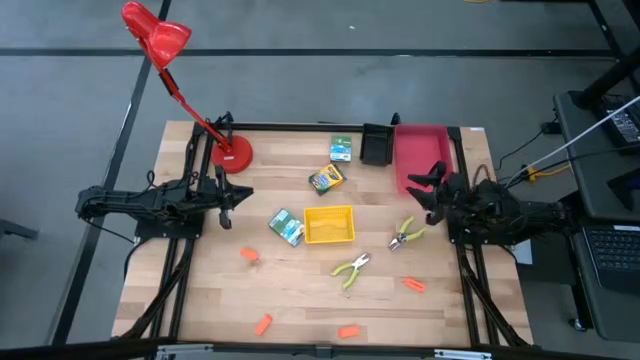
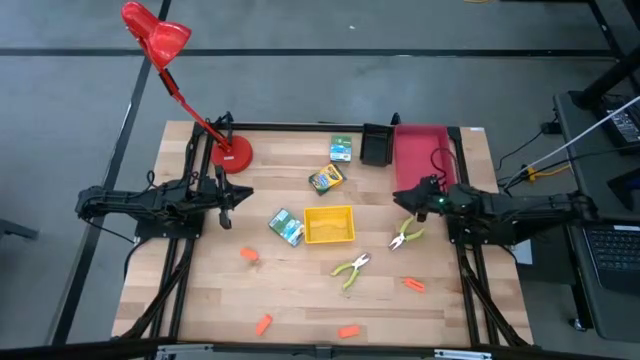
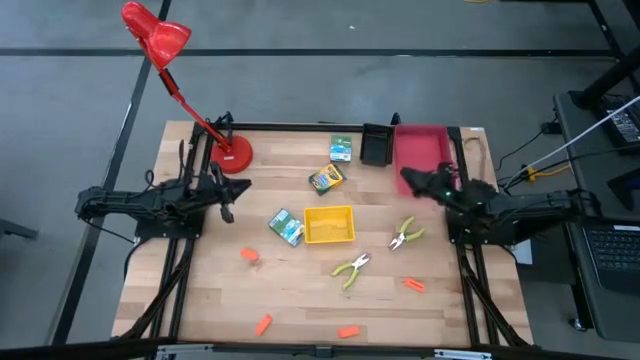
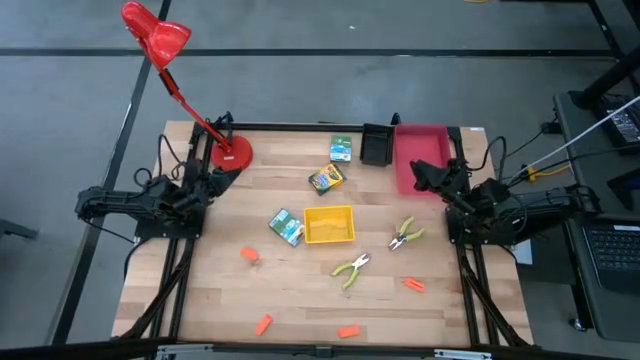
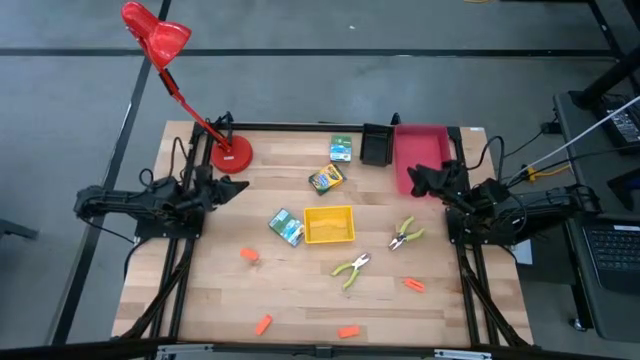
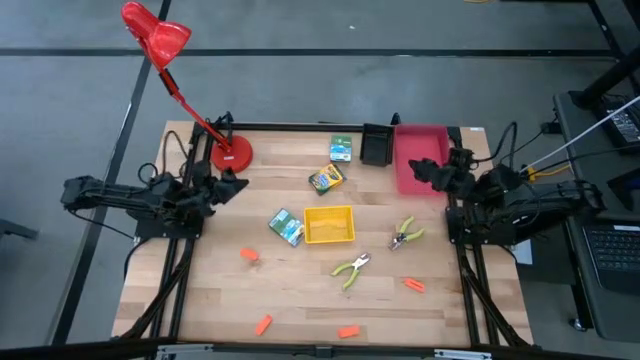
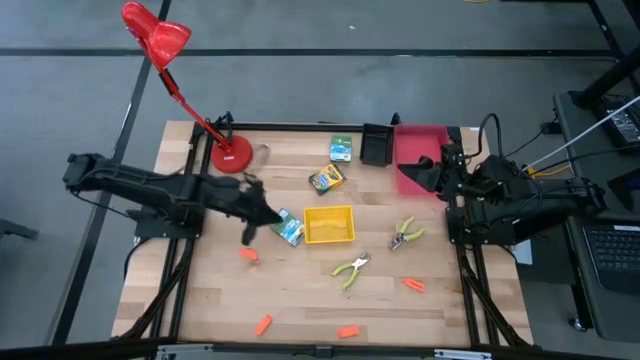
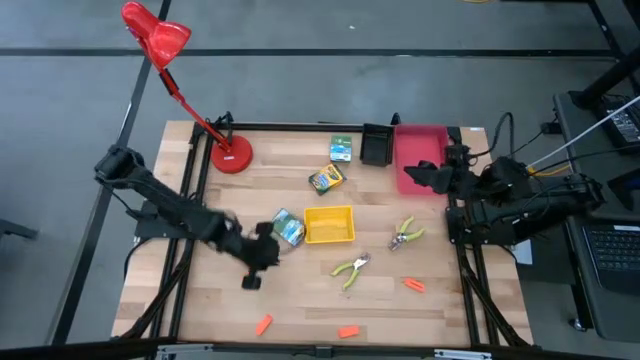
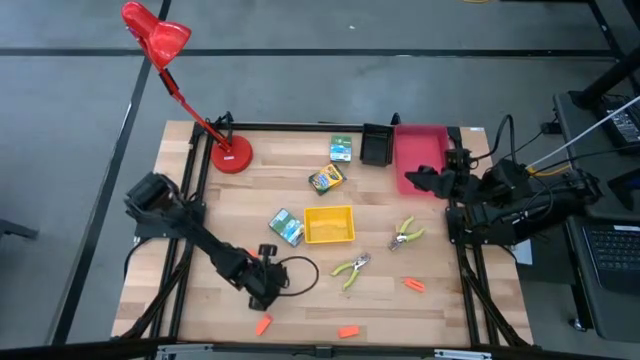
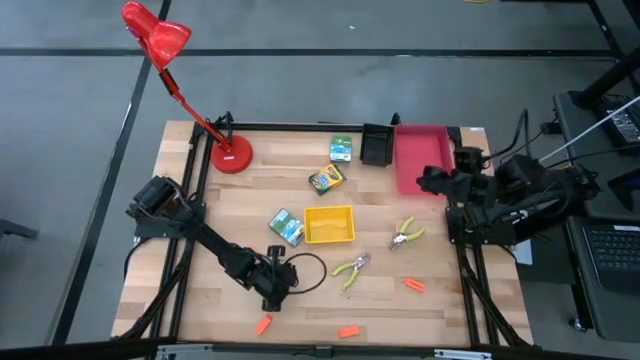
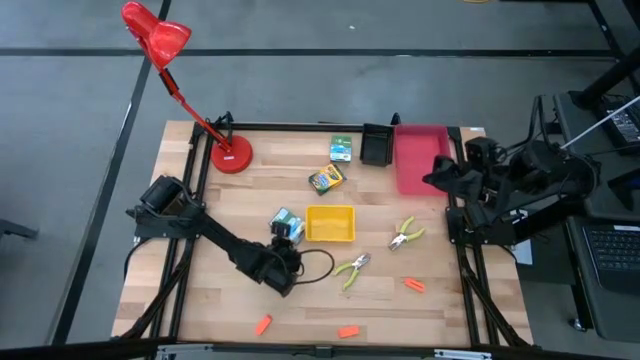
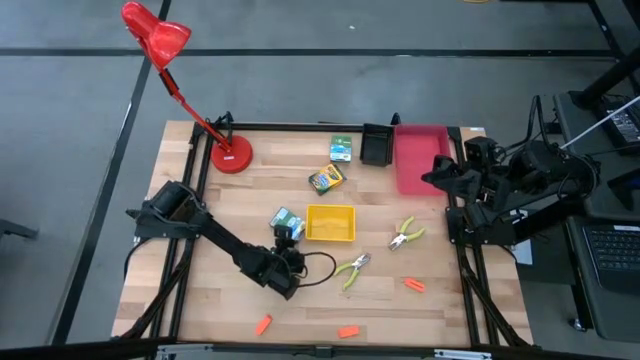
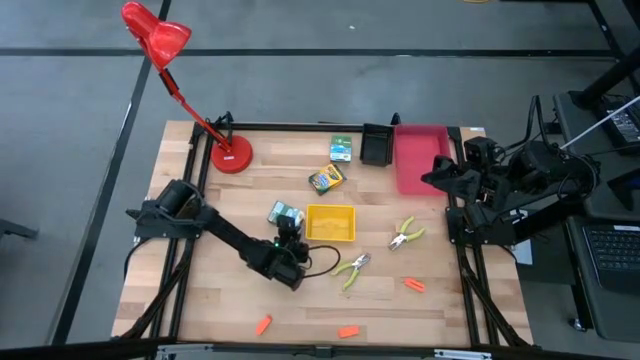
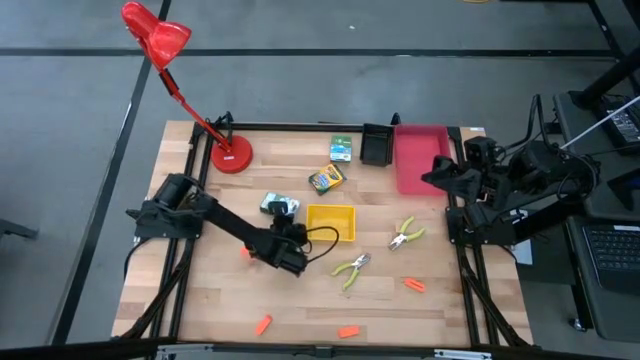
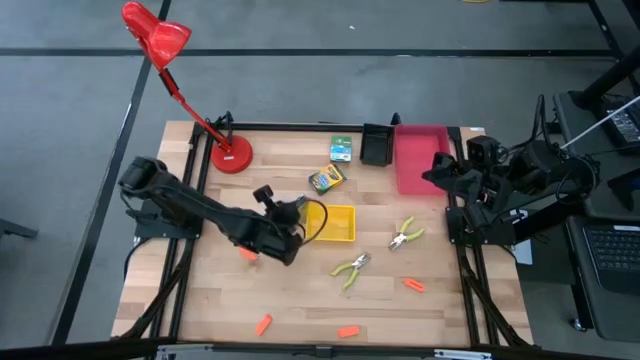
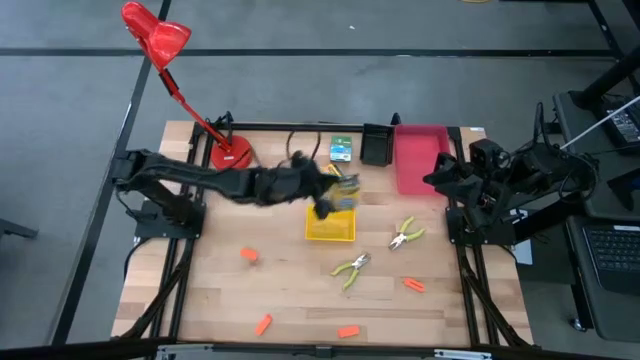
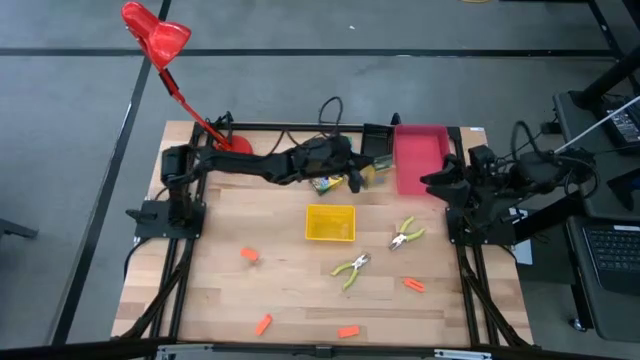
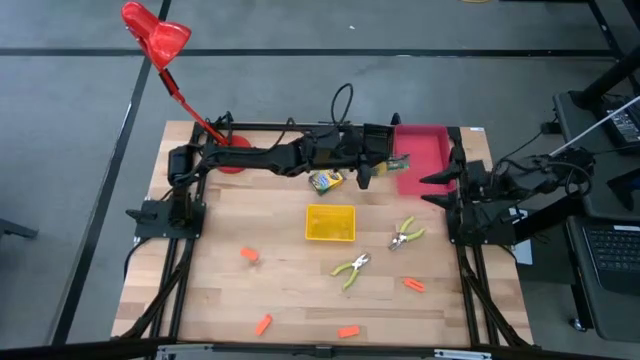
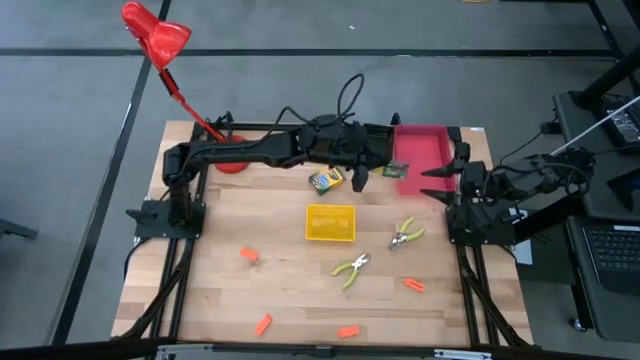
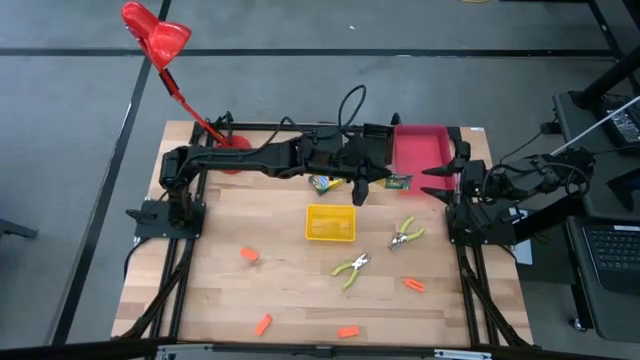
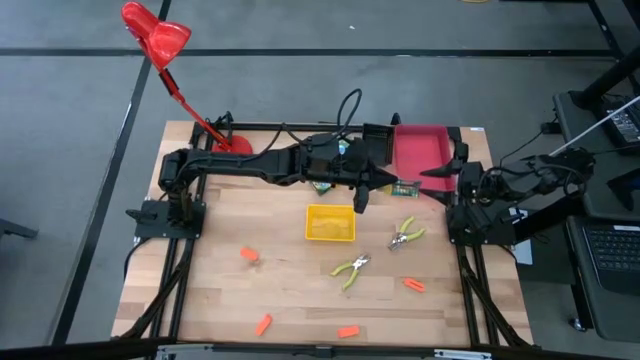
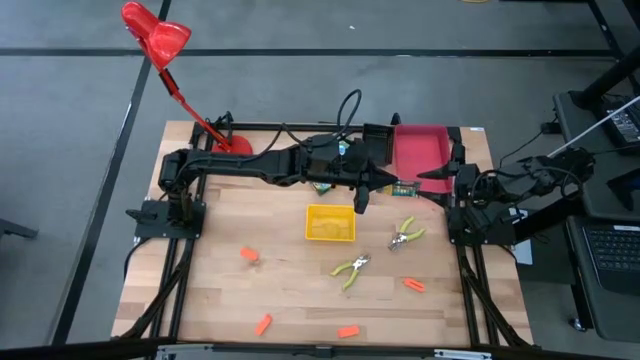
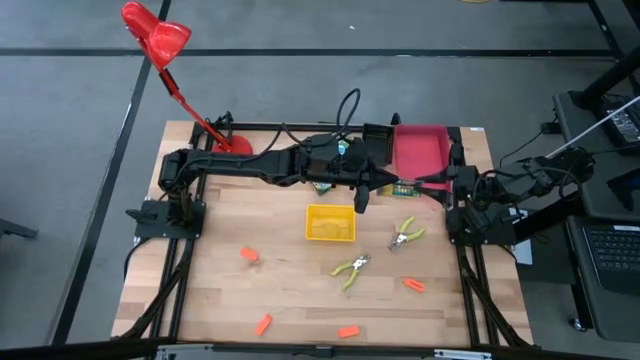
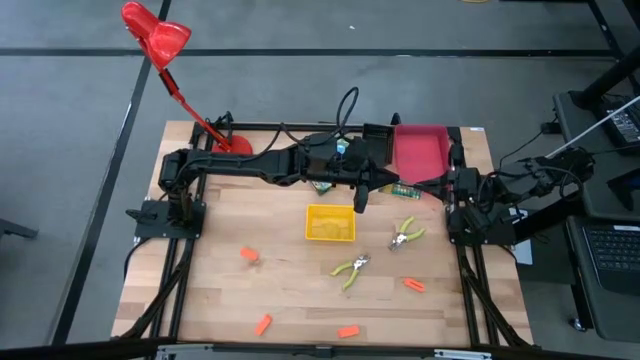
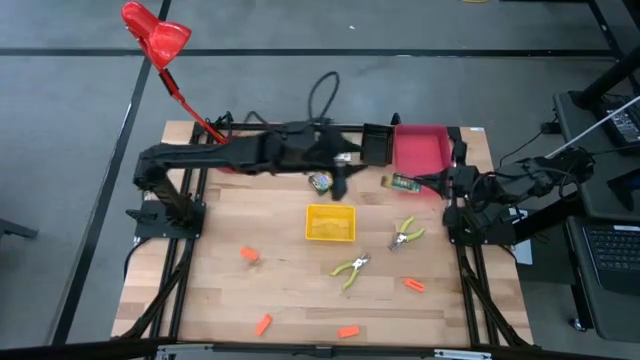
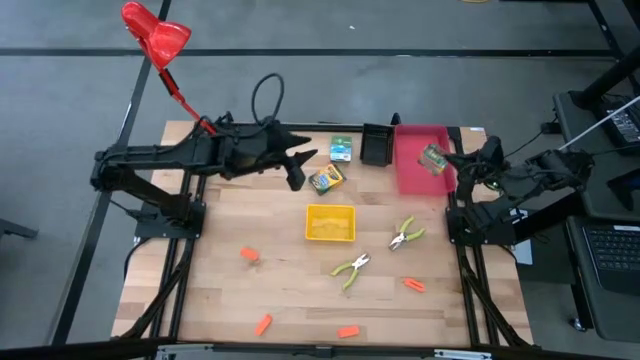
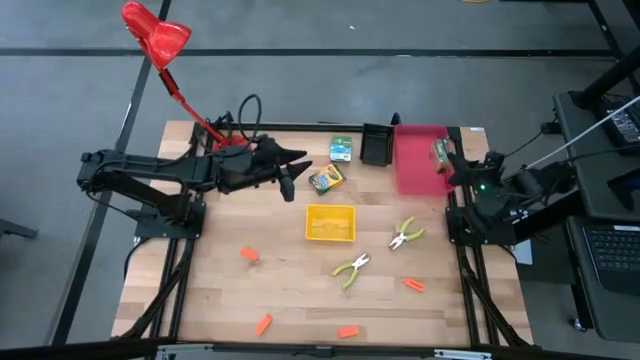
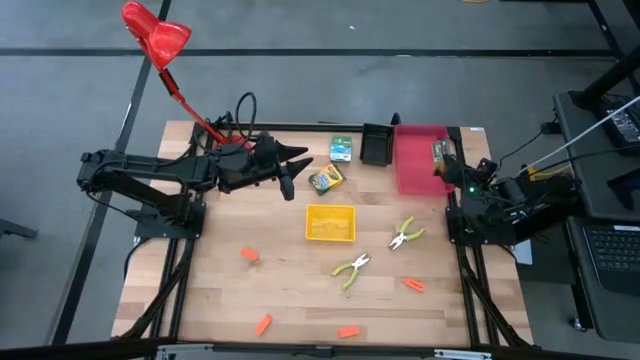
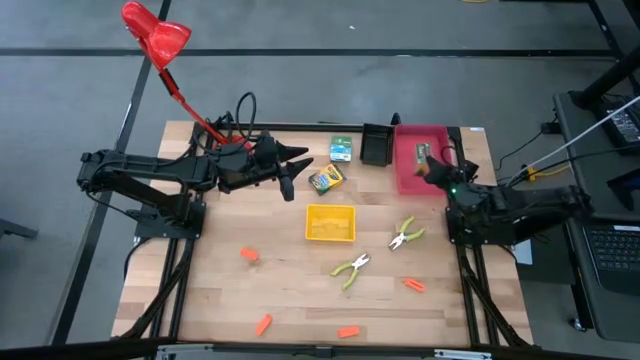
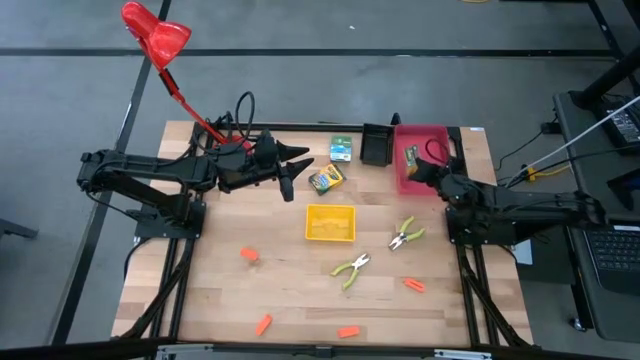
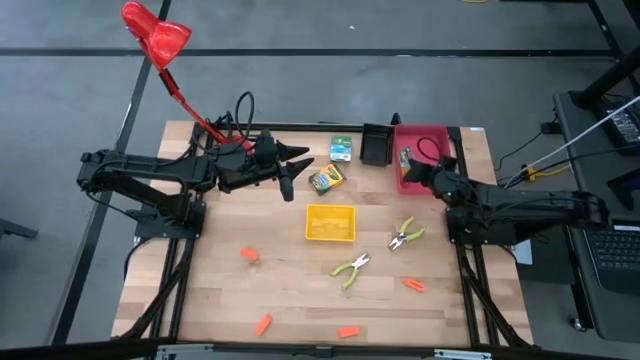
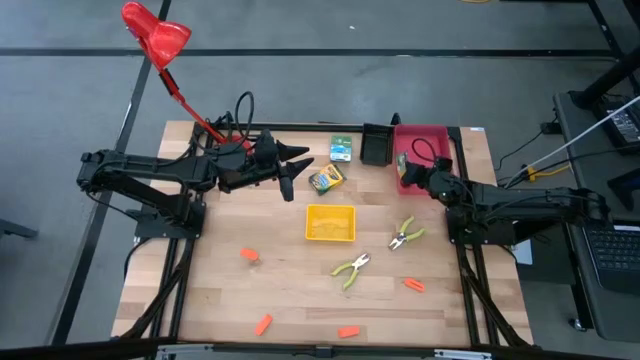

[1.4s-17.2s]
Task: Pick & Place School Supplies
Put the bottom yellow crayon box into the red bin
